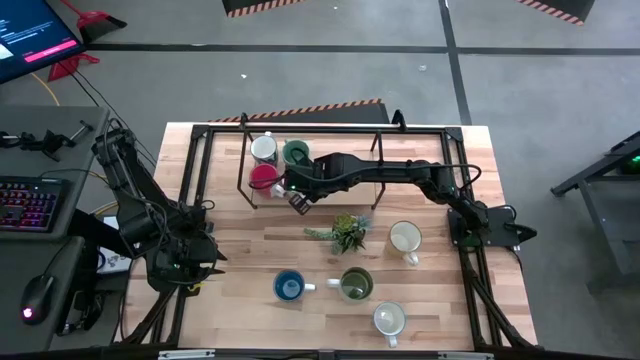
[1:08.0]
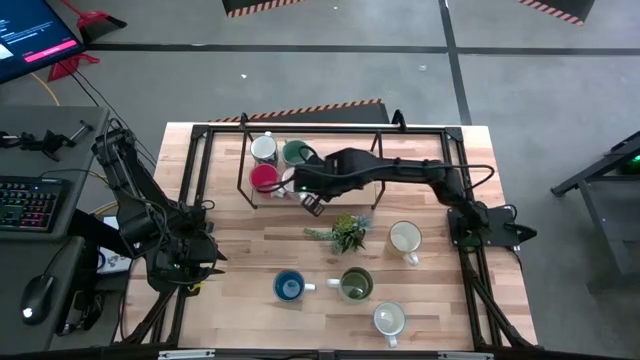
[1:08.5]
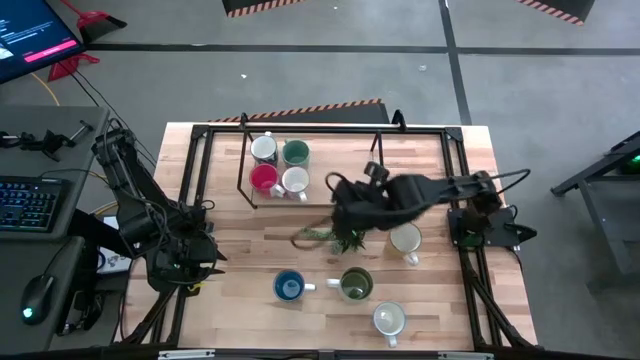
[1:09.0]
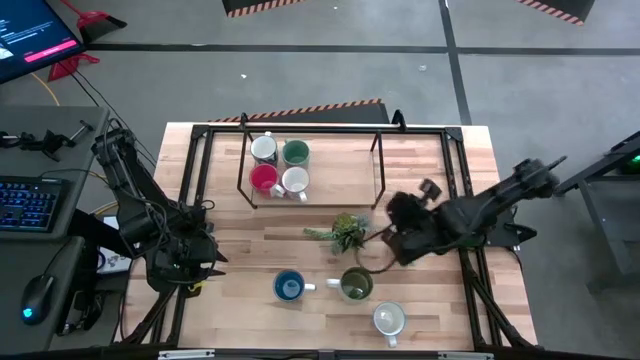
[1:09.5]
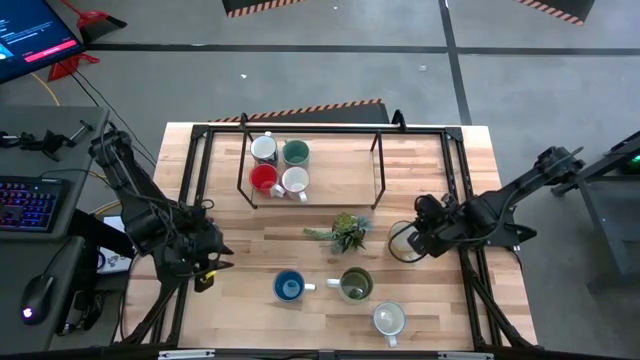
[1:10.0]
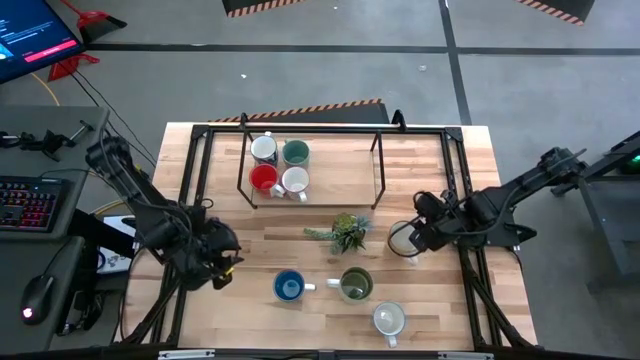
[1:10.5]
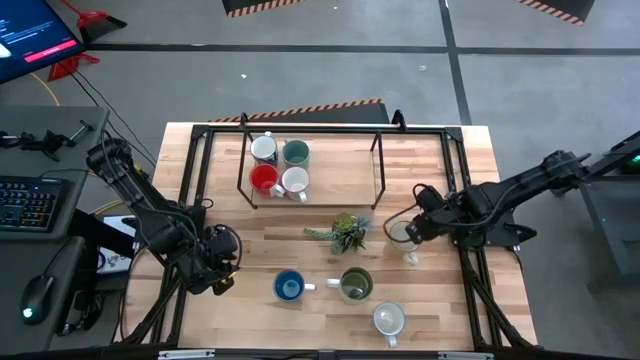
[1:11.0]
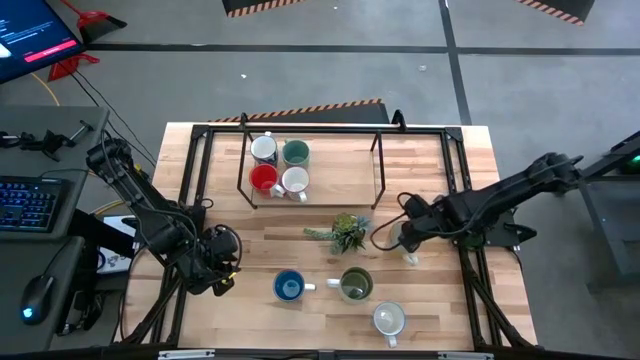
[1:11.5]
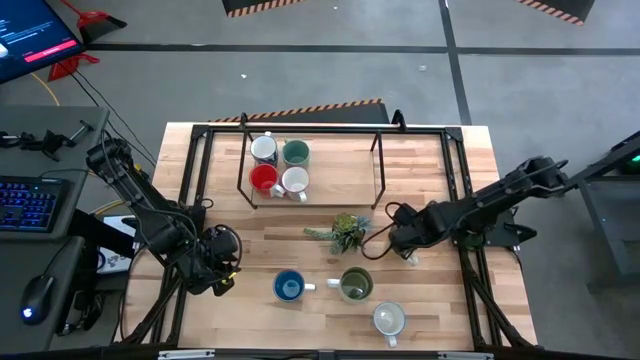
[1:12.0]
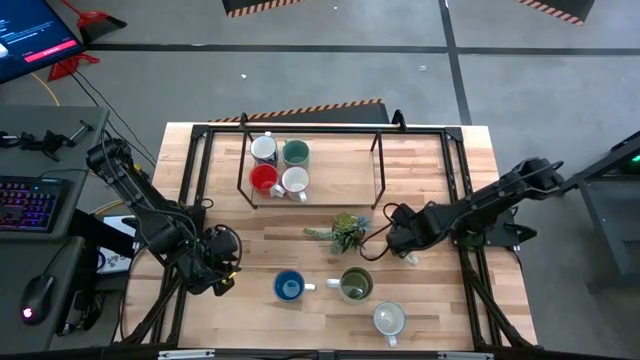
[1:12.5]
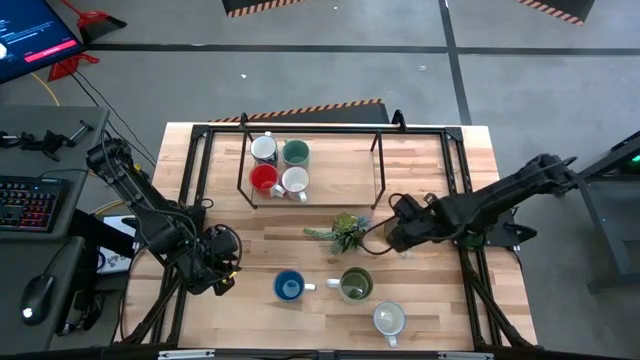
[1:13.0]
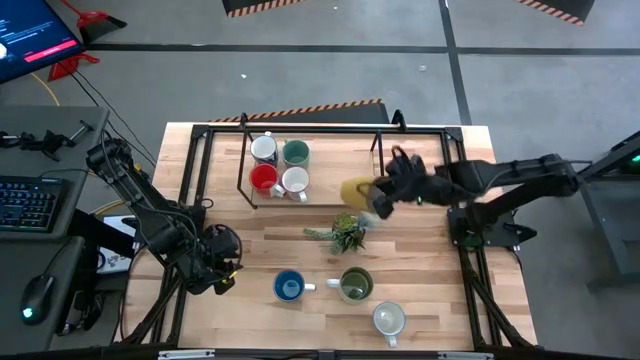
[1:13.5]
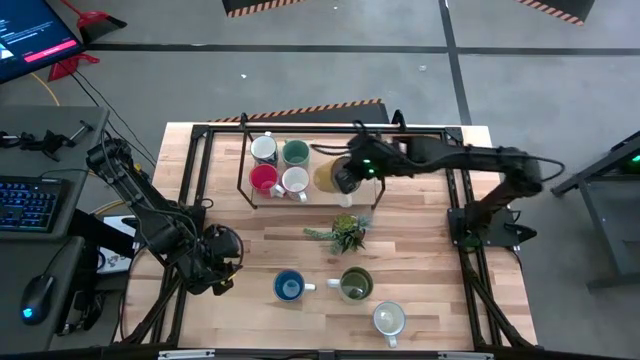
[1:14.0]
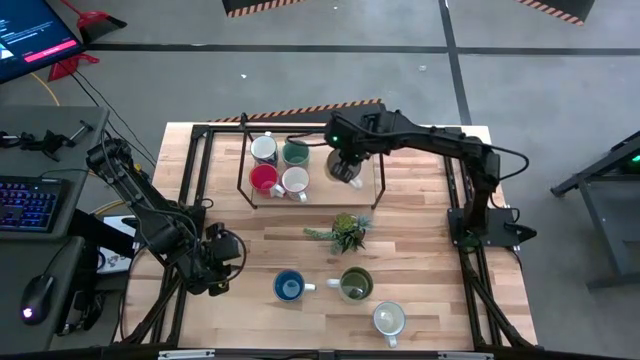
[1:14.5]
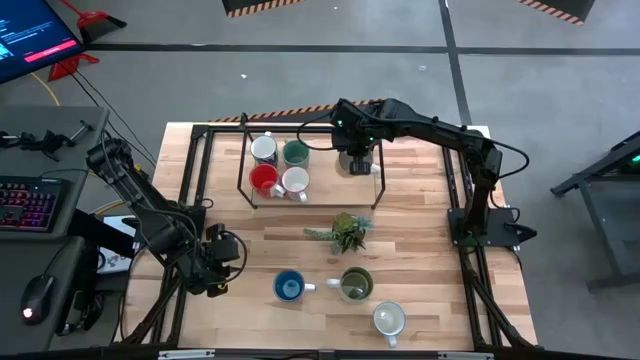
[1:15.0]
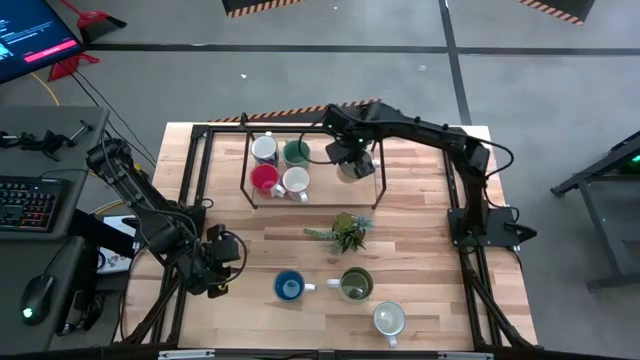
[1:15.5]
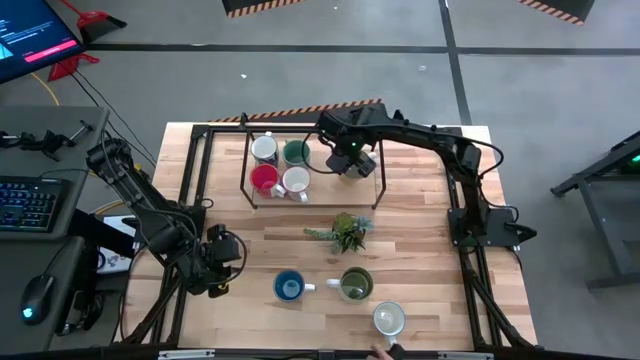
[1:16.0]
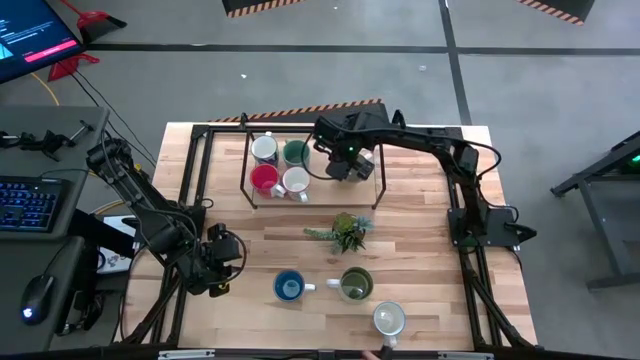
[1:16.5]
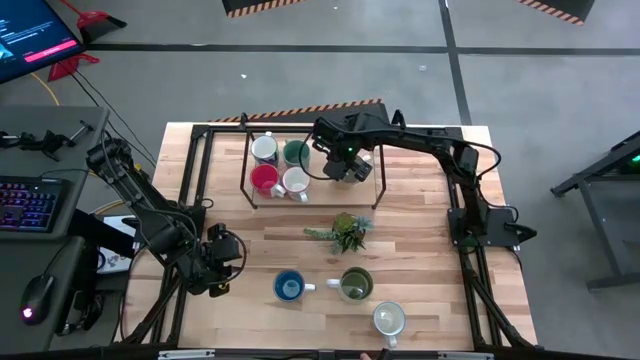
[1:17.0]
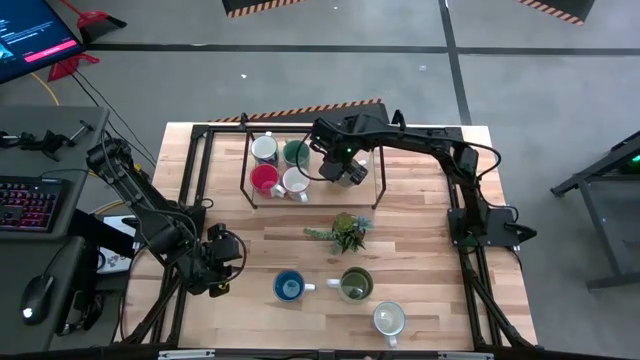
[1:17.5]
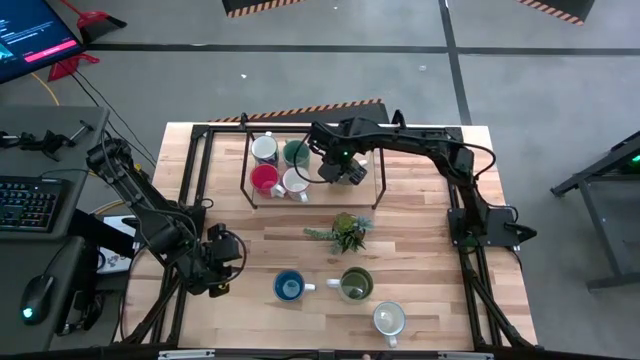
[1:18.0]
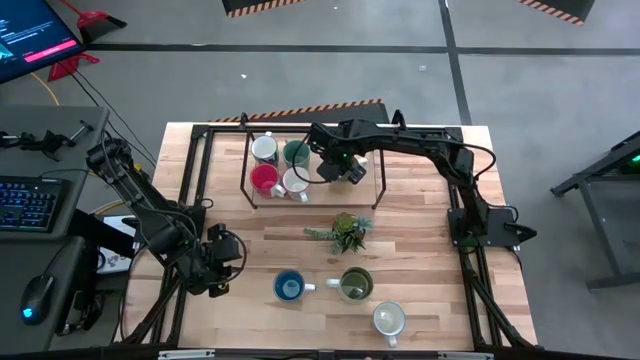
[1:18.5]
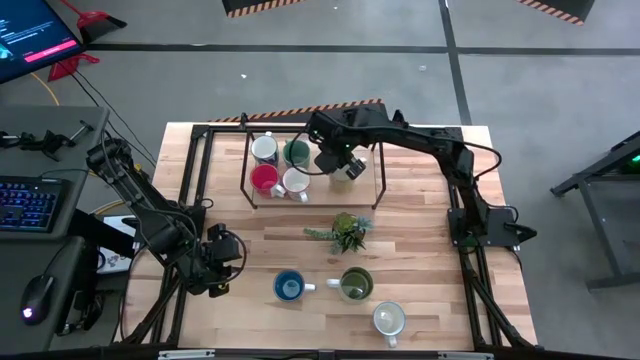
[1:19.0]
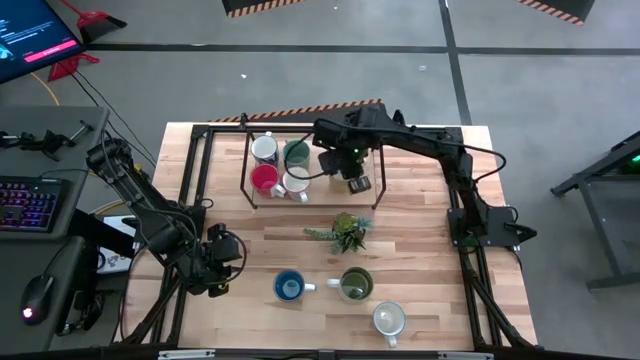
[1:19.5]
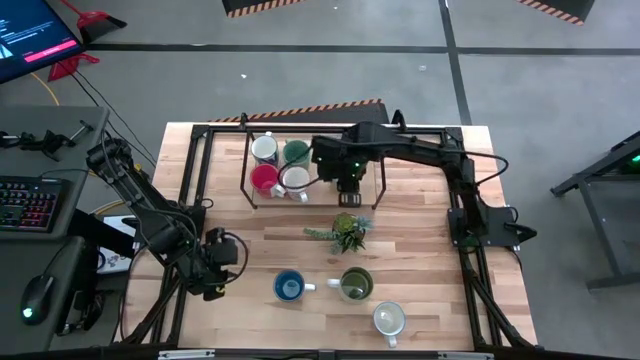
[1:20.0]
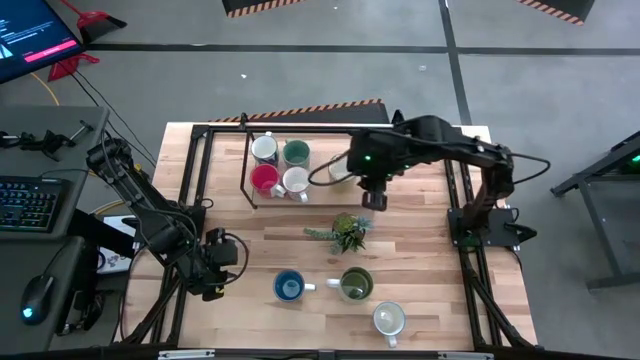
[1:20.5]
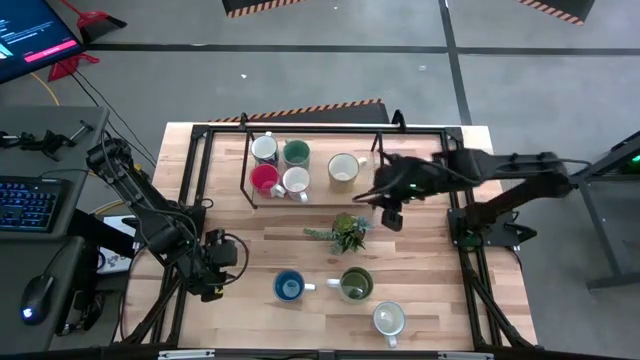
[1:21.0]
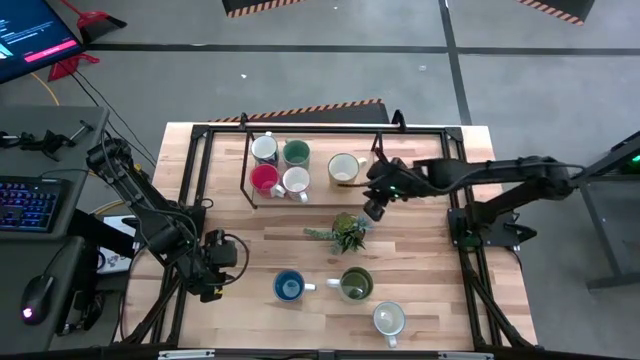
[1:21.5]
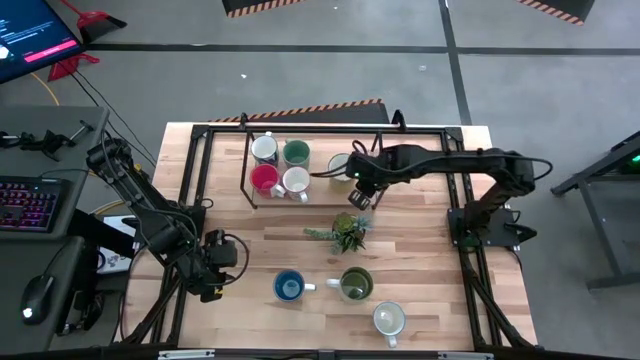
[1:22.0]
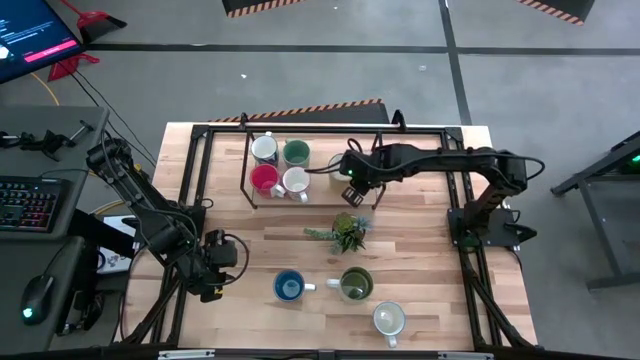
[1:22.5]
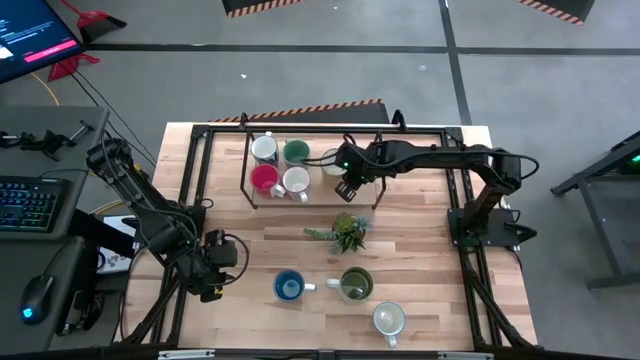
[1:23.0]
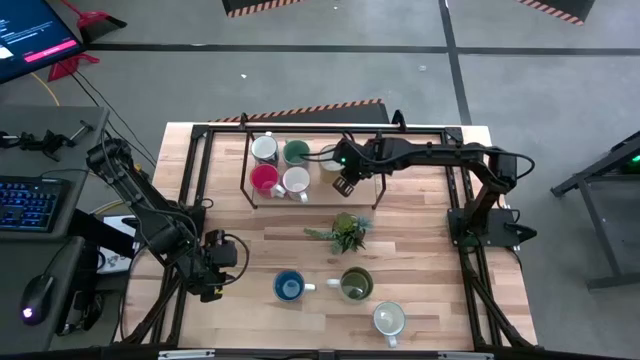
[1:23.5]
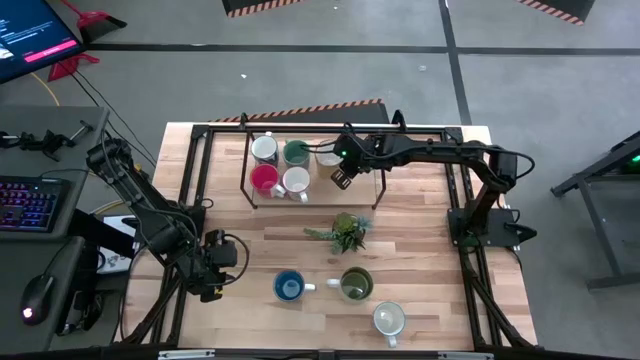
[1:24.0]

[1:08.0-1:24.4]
Task: Place coffee mugs
Put the yellow mug on the shelf

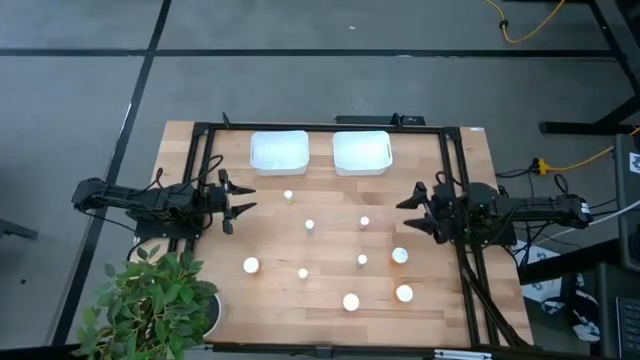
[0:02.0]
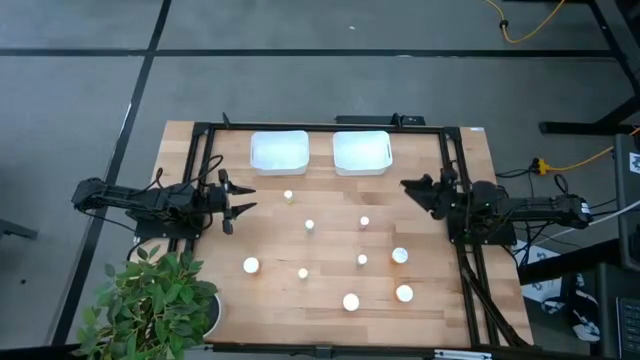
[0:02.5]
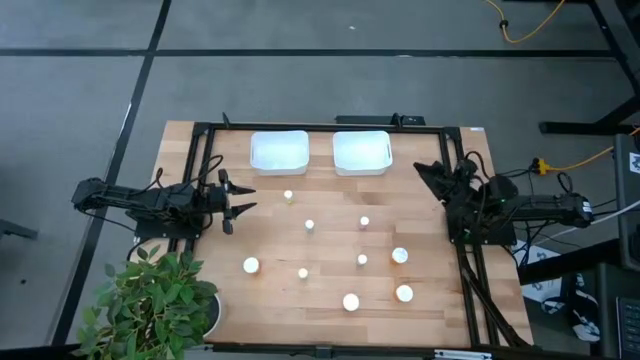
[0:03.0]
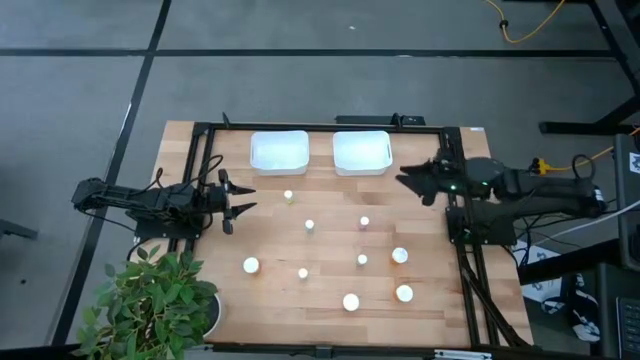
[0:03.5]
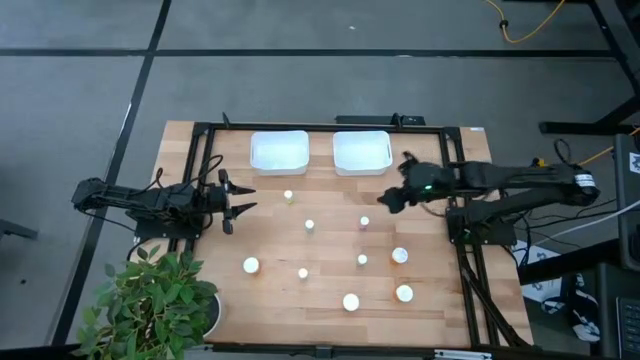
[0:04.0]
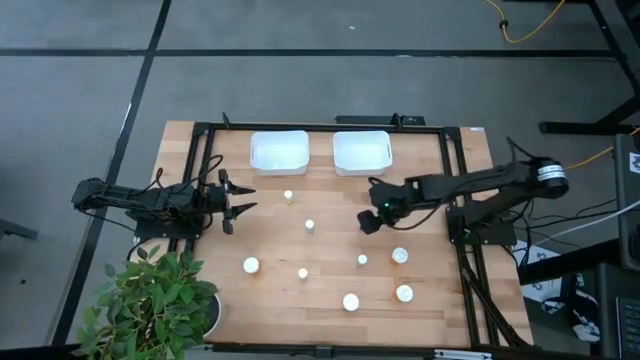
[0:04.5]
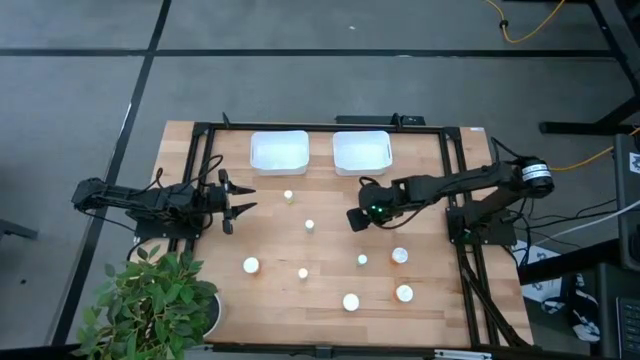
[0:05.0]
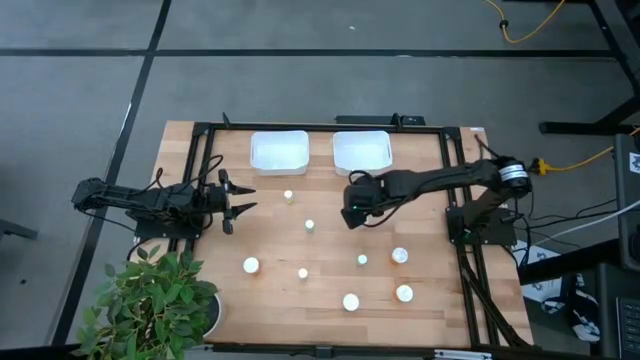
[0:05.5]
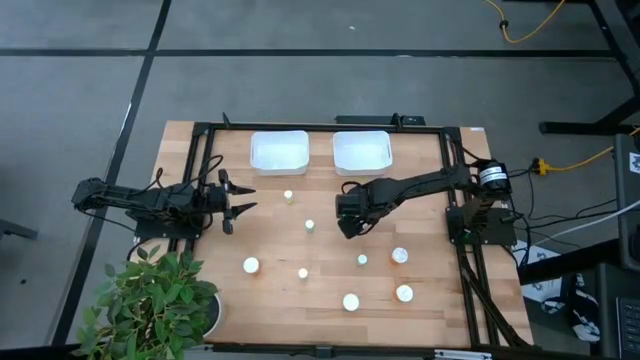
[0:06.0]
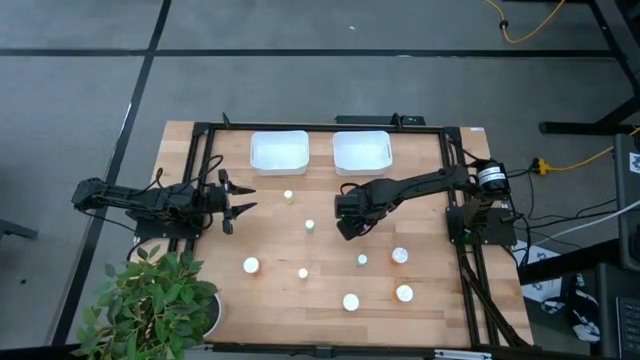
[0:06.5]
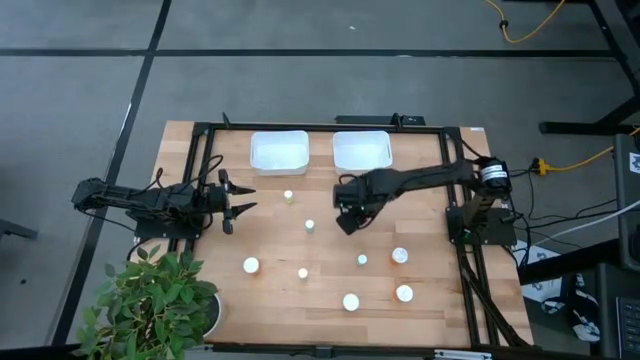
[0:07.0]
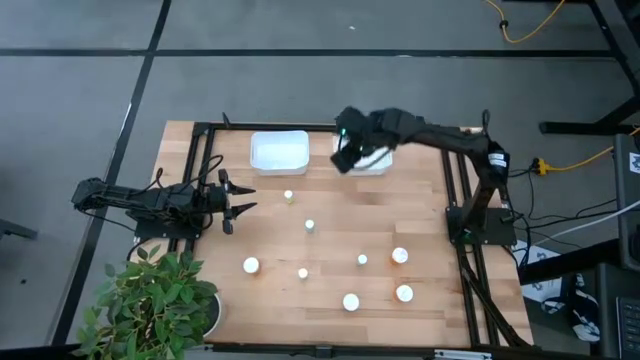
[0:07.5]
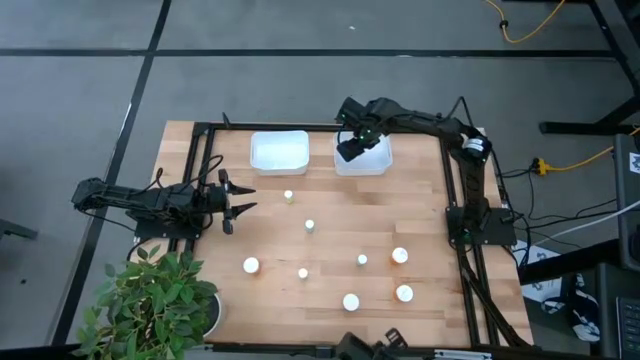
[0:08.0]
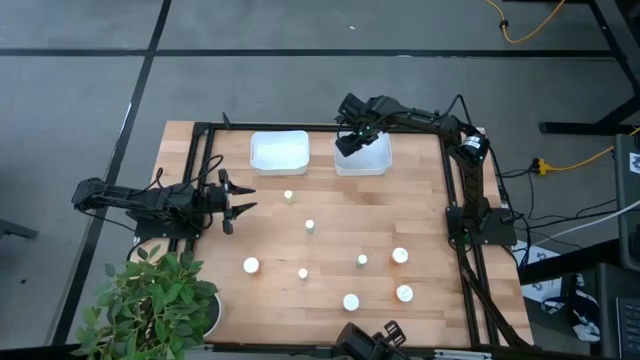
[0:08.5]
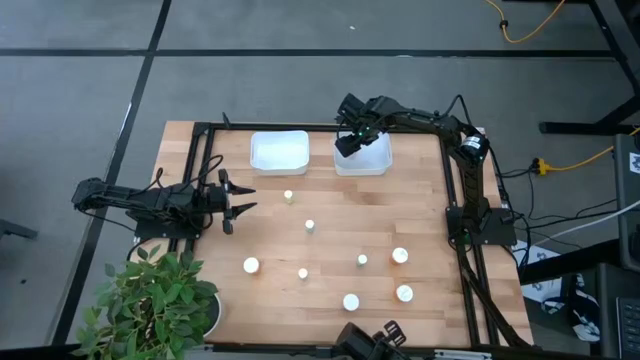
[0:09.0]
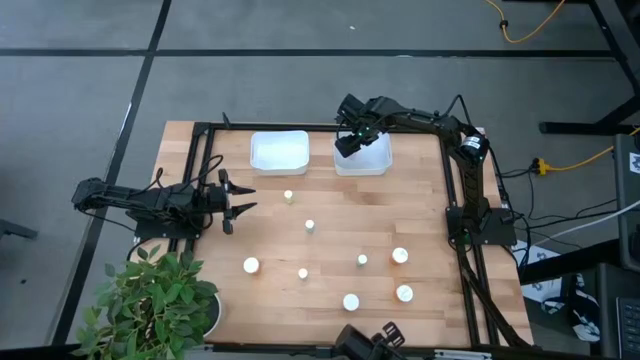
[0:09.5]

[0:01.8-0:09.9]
Task: Pick and place medicine bottles into bin by pill shape (circle, oval)
Put the pink pill bottle into the right white bin
